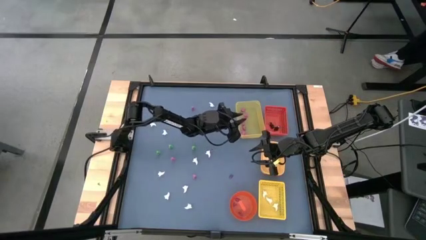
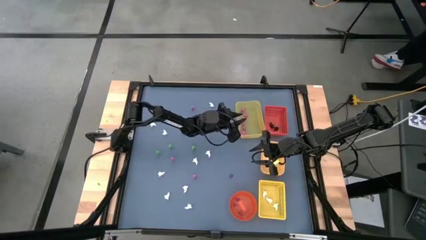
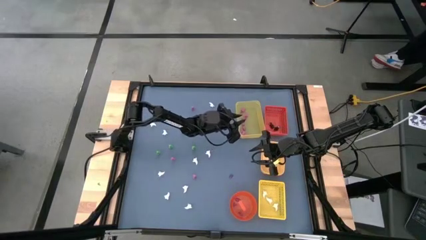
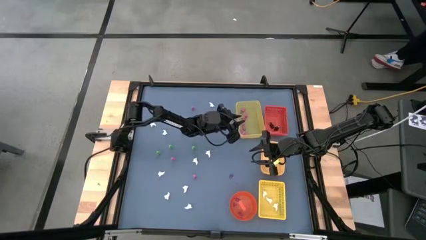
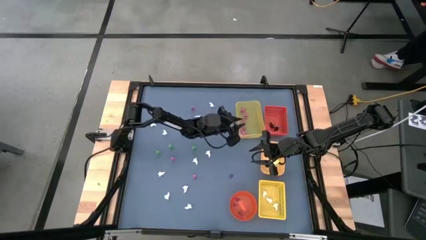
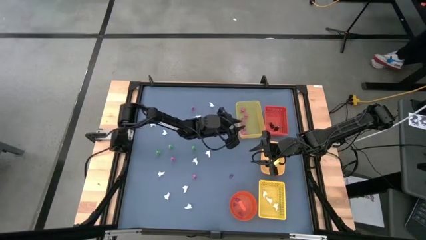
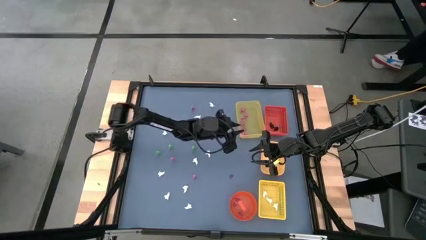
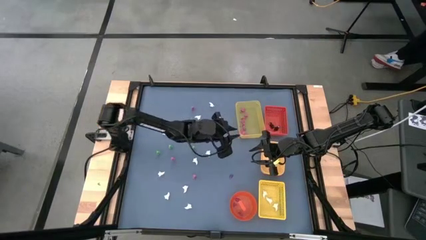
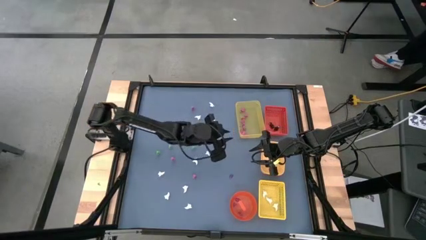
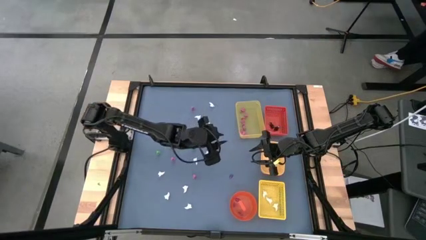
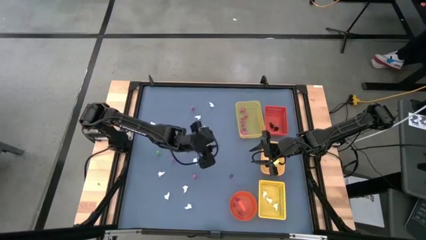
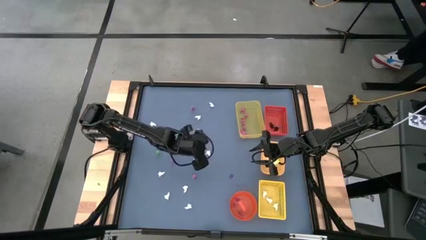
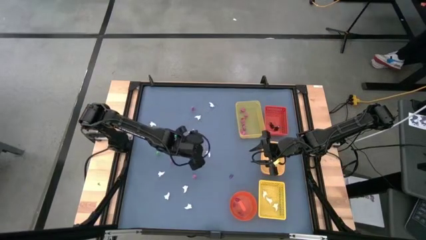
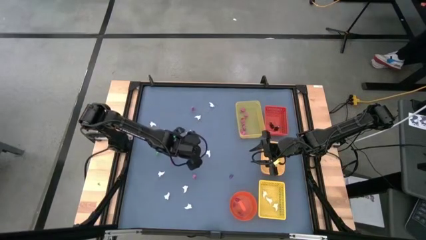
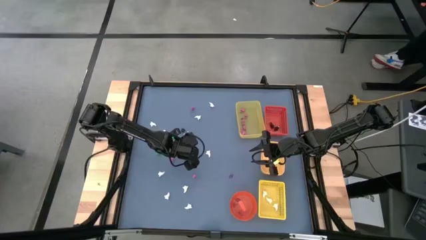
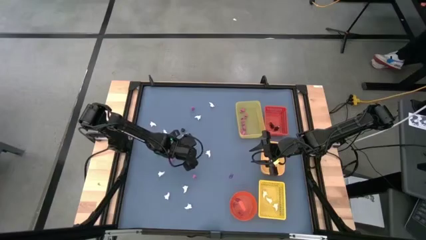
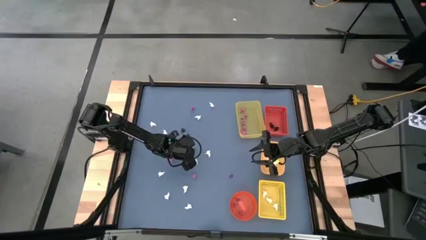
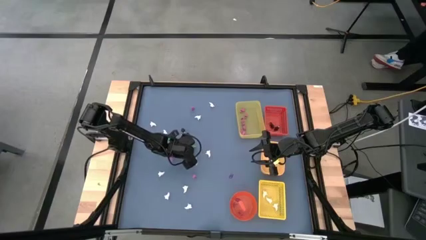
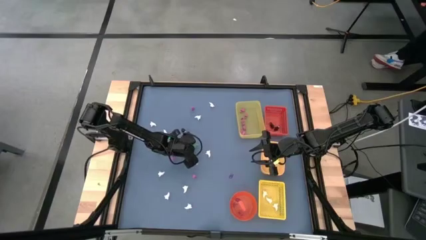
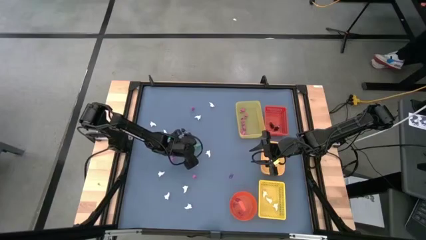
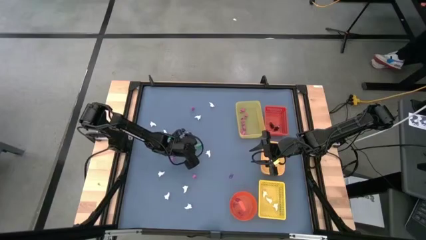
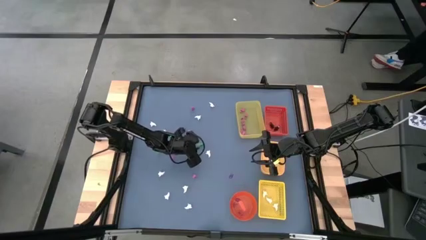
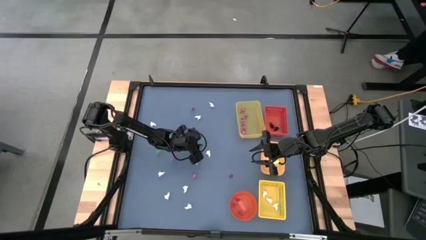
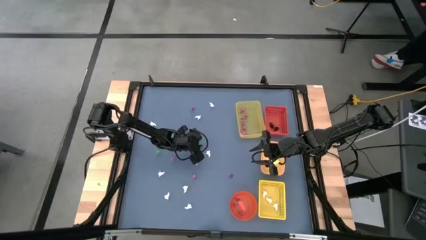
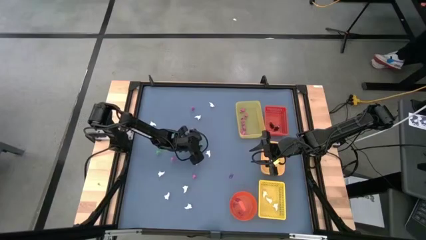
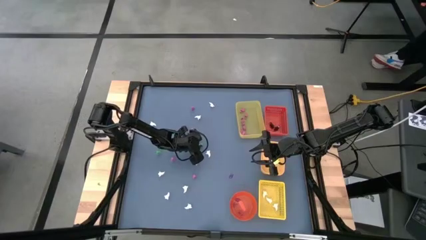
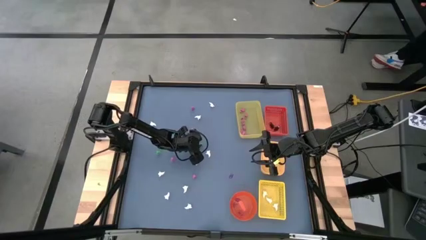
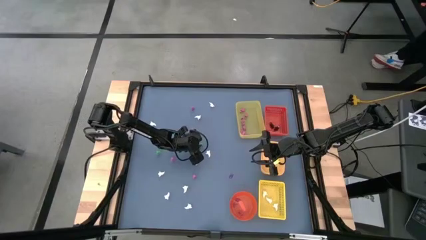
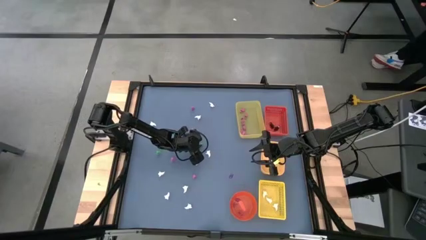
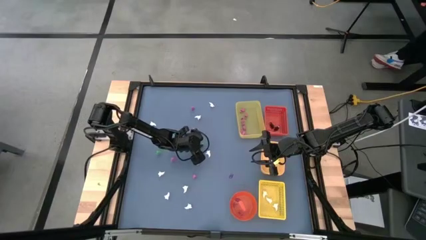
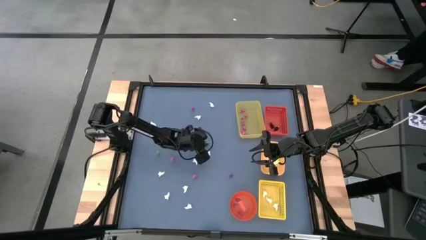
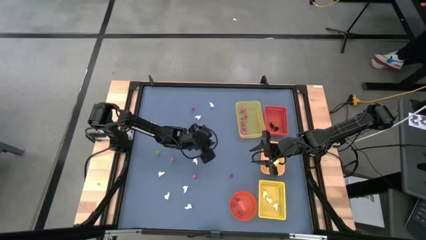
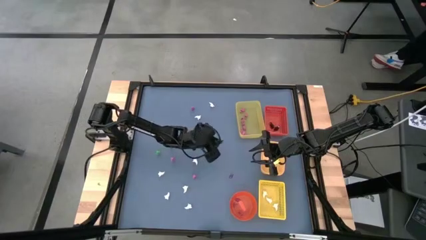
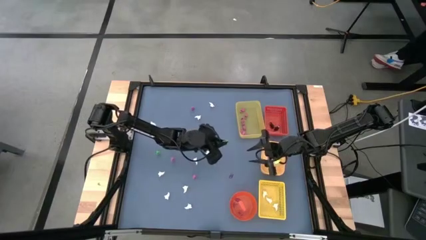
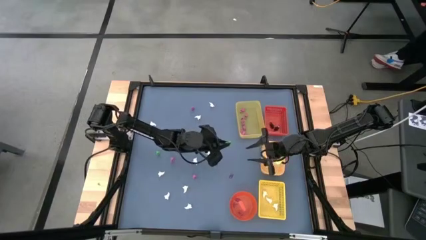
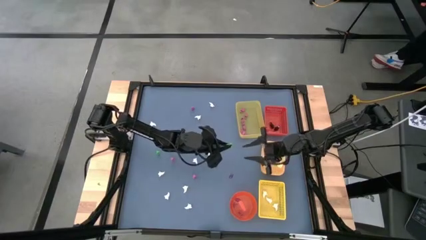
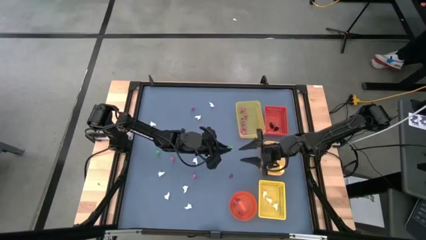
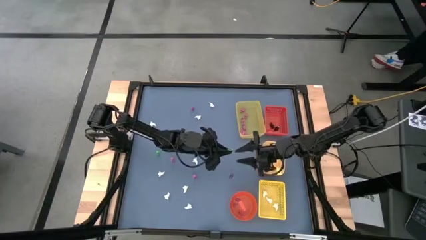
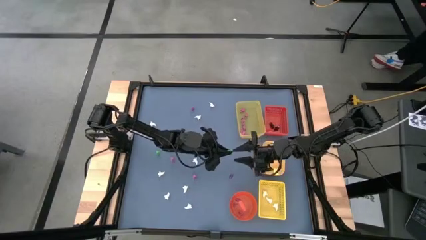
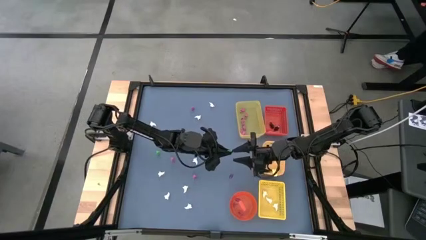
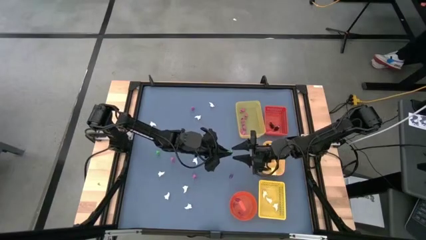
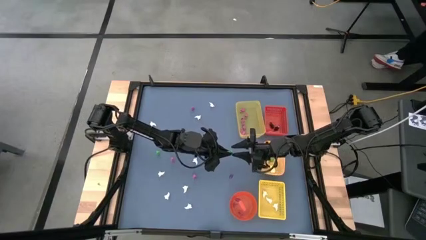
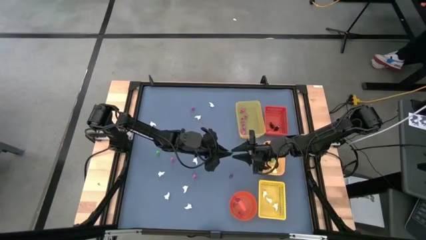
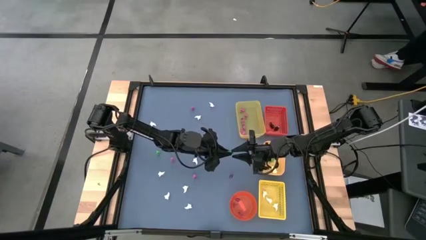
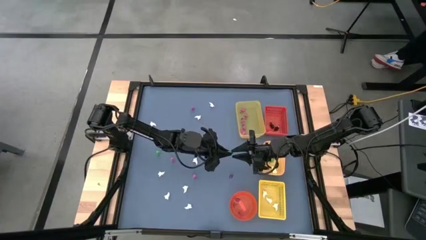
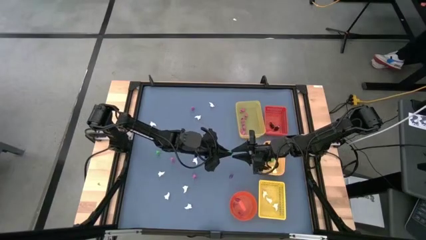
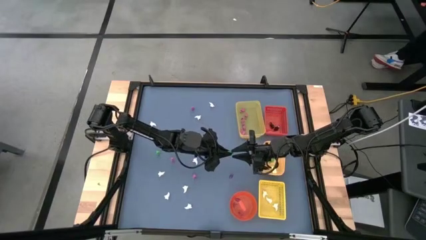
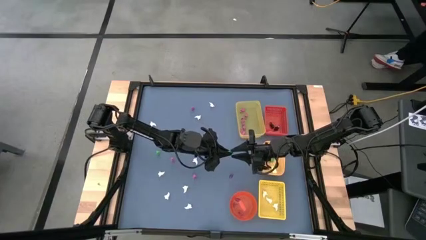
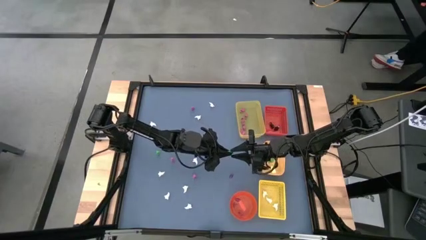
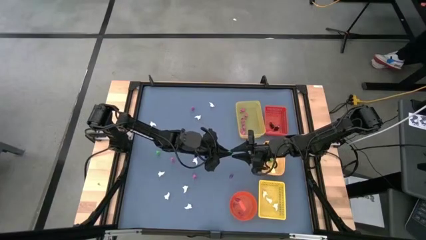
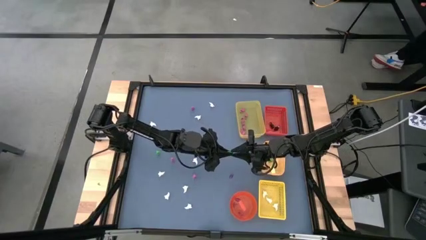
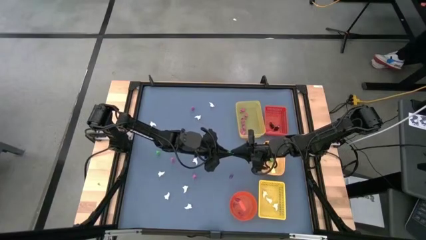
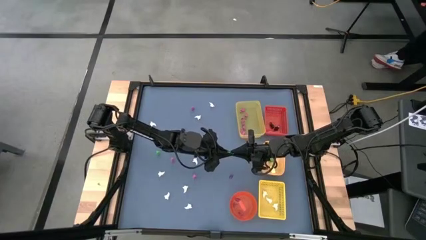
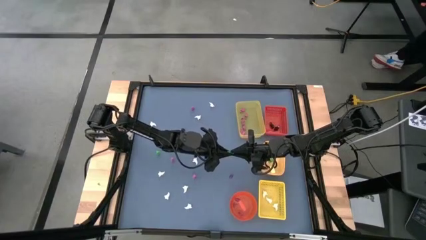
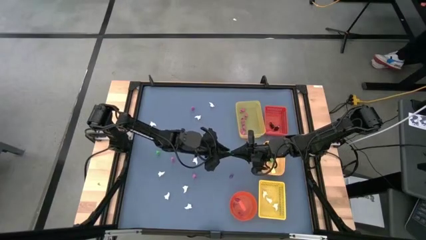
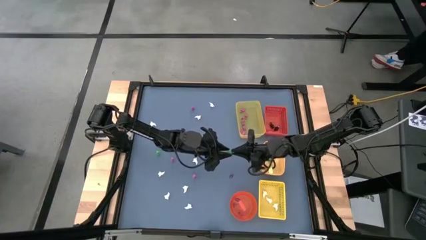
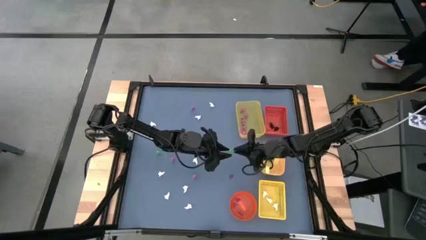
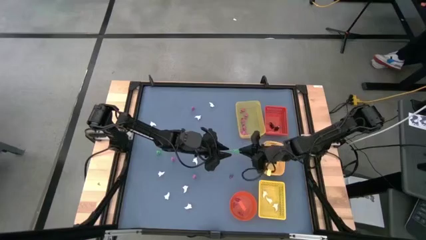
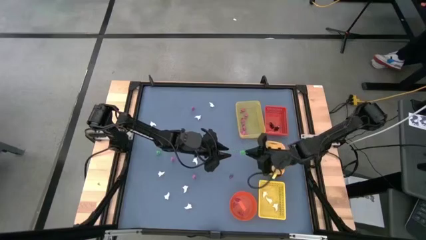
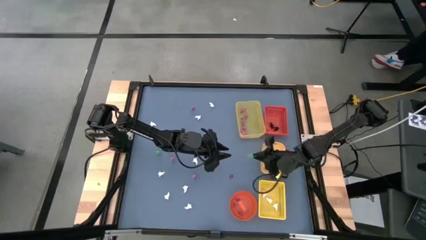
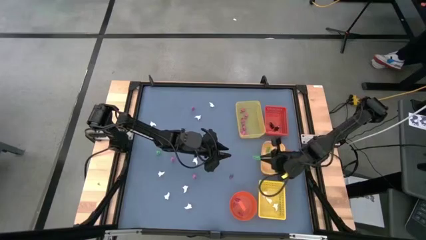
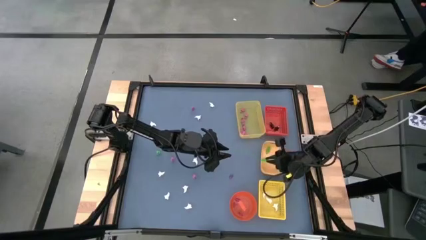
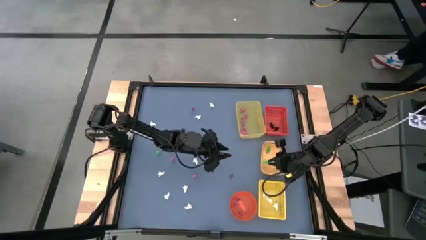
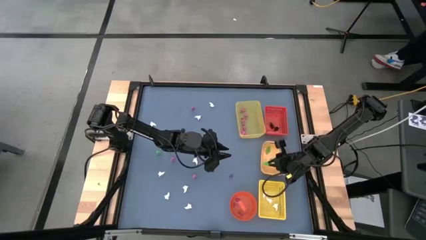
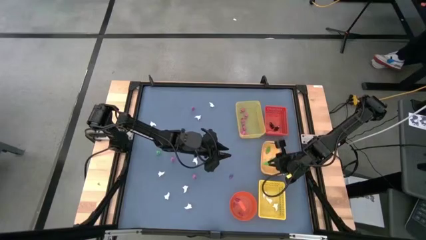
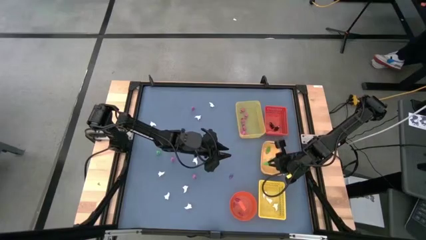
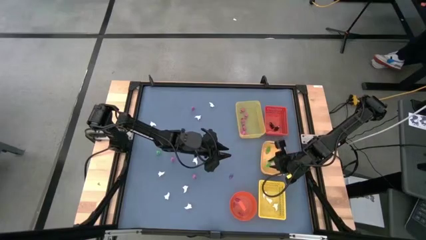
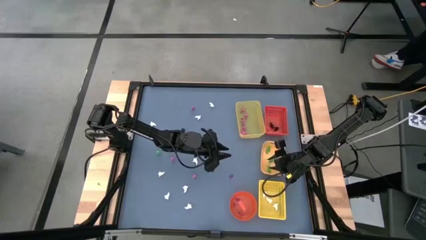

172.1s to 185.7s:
Task: Sort Halloween decoration
Put the green skeleton toy into the middle yellow bin
